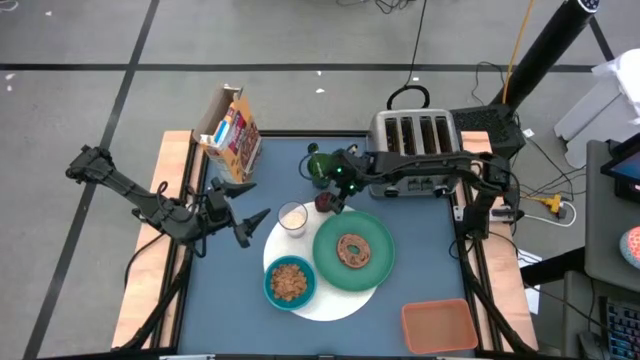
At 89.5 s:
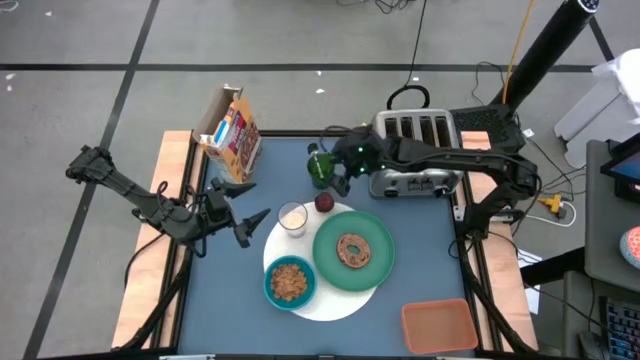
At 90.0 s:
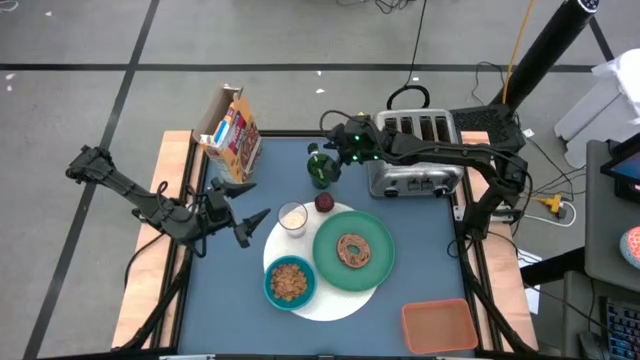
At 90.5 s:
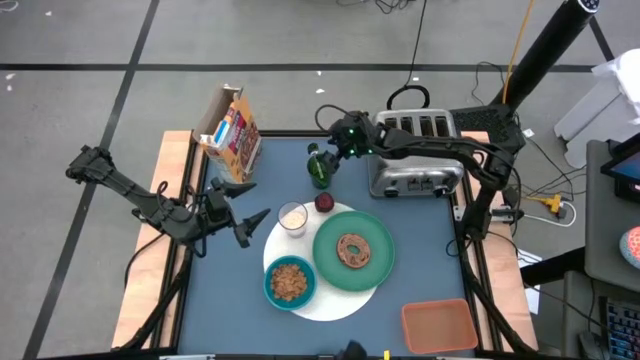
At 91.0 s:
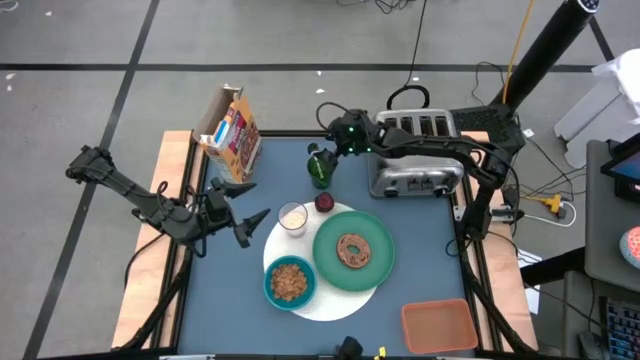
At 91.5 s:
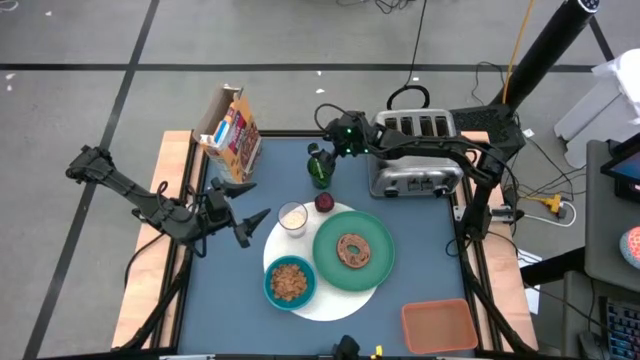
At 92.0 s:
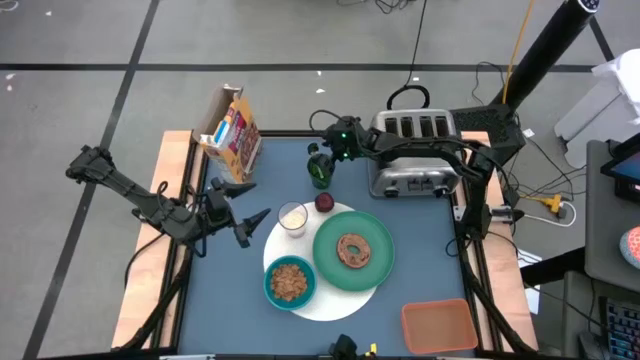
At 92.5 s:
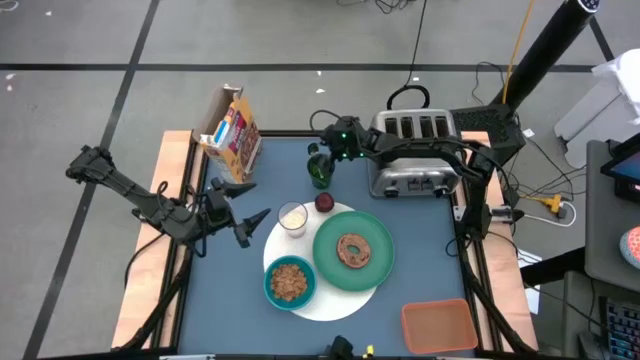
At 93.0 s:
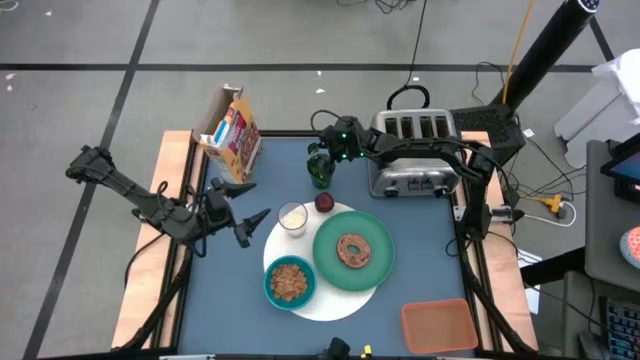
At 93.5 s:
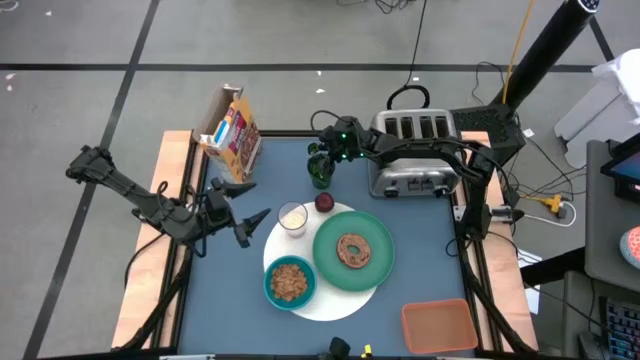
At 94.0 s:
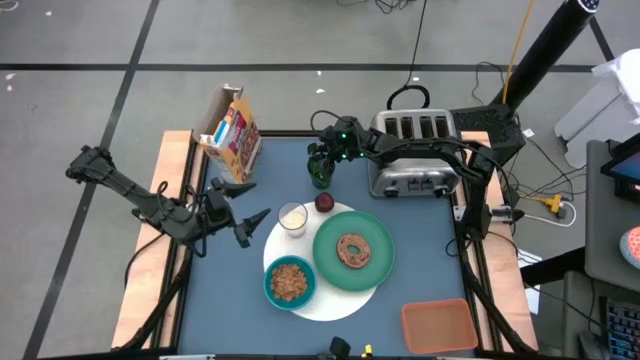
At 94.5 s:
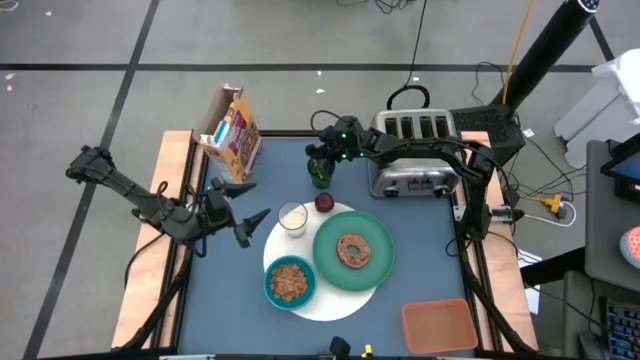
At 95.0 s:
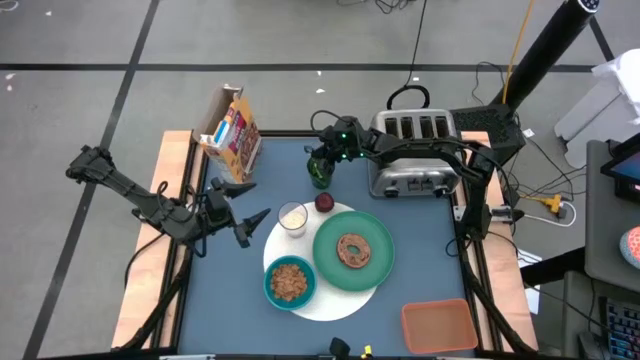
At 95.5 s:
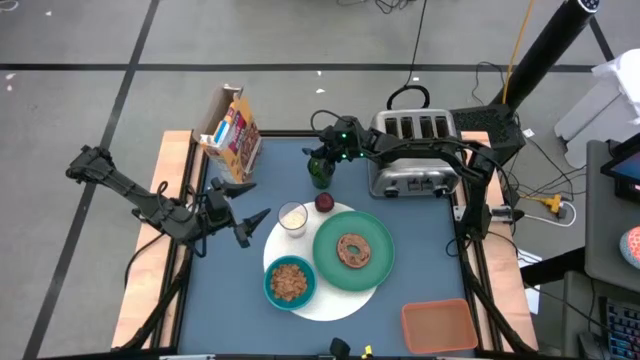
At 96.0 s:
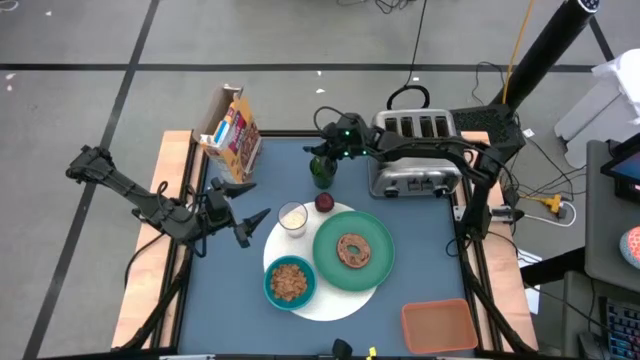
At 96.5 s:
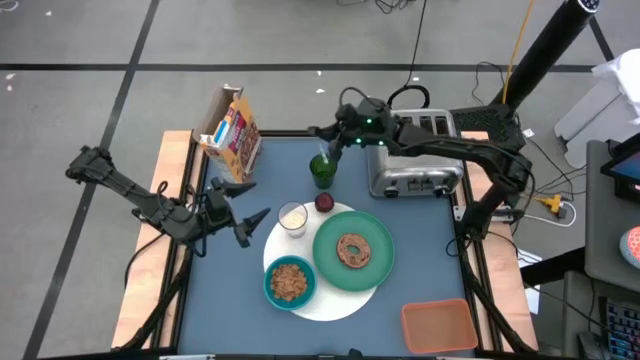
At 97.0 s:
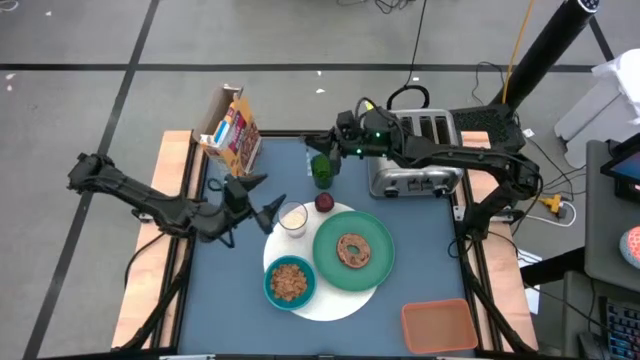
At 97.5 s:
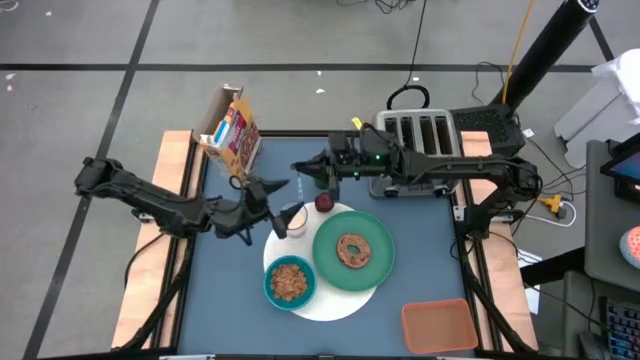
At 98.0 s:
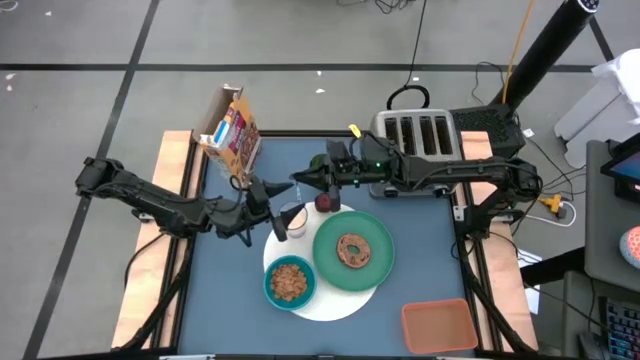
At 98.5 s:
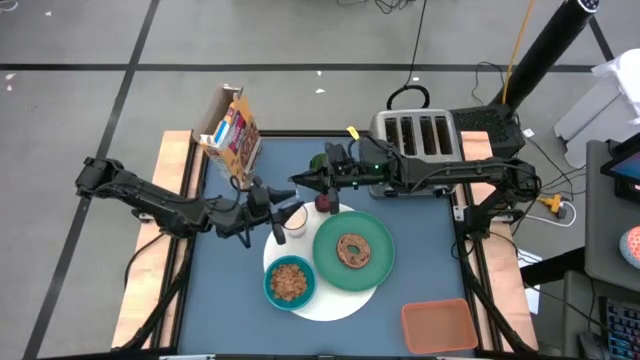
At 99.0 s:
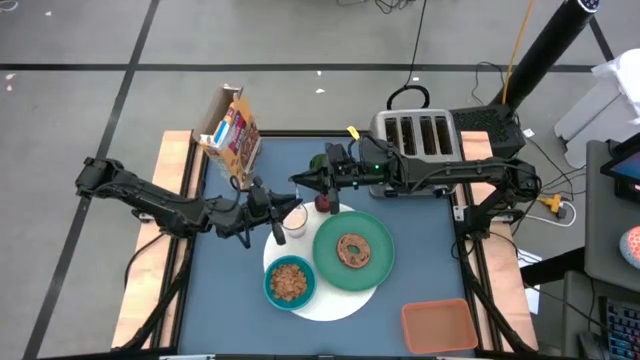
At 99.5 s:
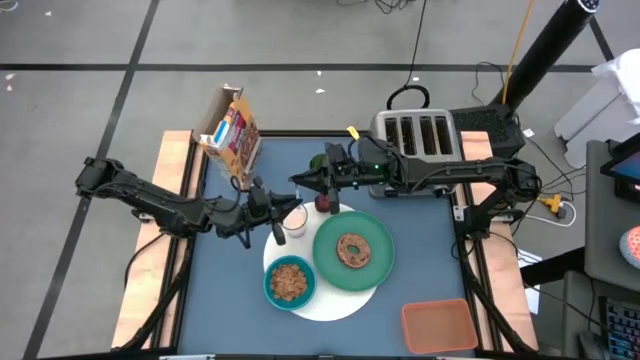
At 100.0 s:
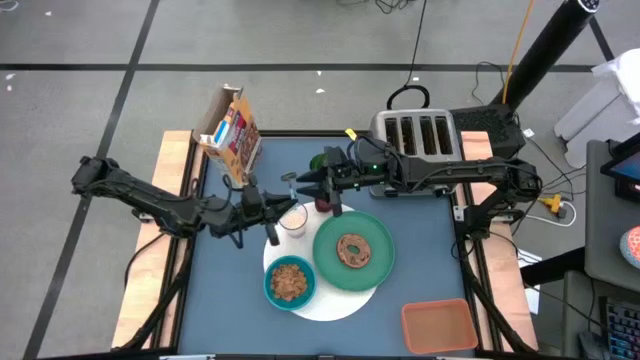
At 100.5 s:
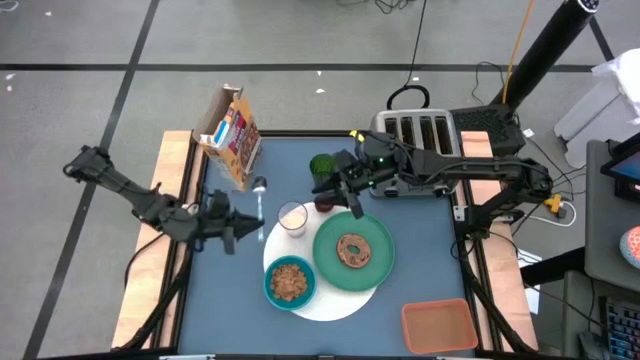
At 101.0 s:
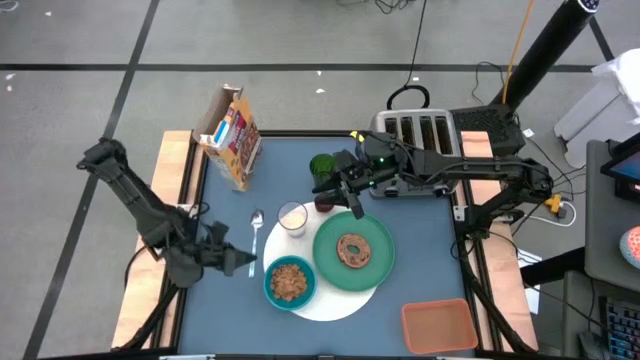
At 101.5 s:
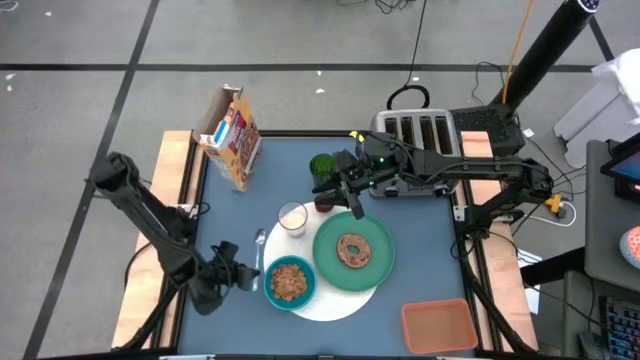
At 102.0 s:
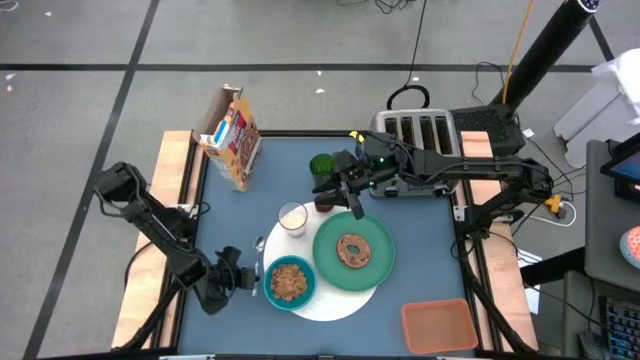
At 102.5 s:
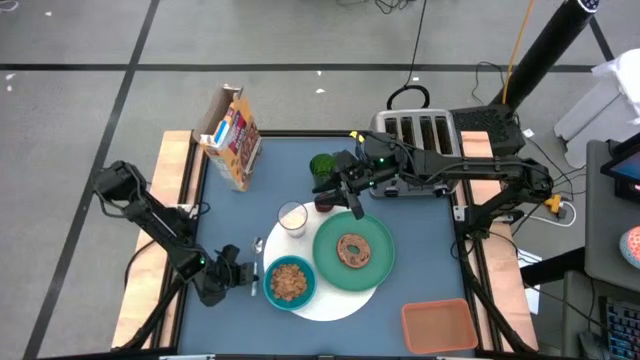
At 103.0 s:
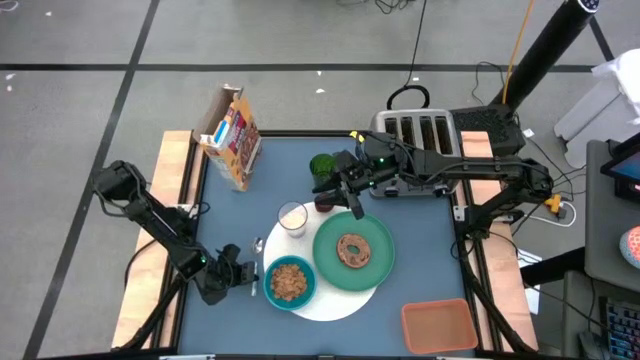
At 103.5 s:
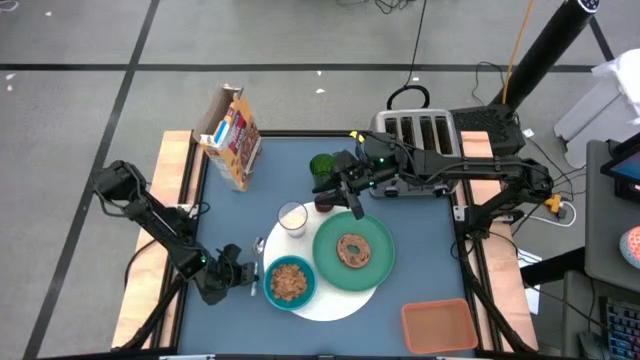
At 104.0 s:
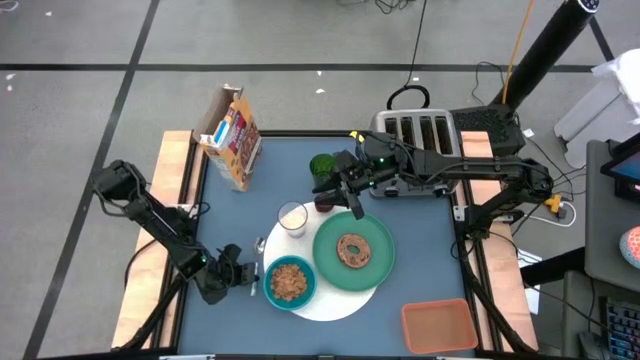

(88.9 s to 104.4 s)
Task: Arrange a breakfast setting
Put the white green spoon to the left of the white tablemat

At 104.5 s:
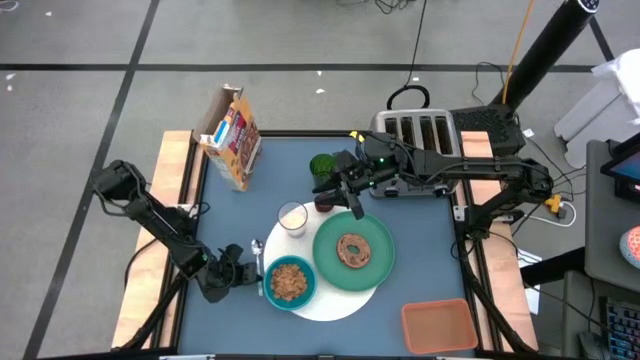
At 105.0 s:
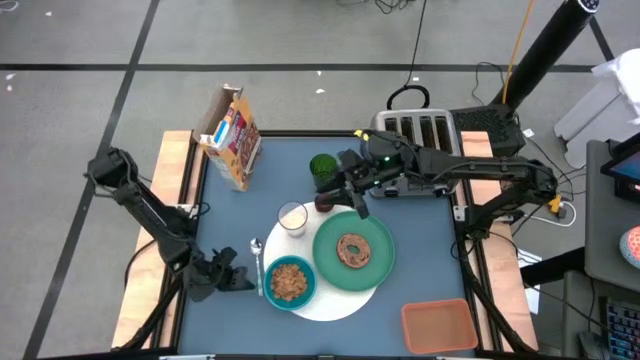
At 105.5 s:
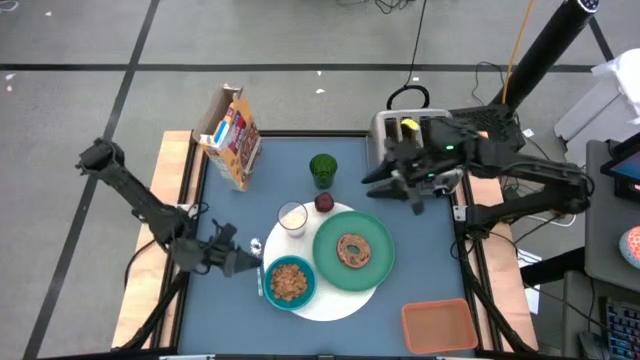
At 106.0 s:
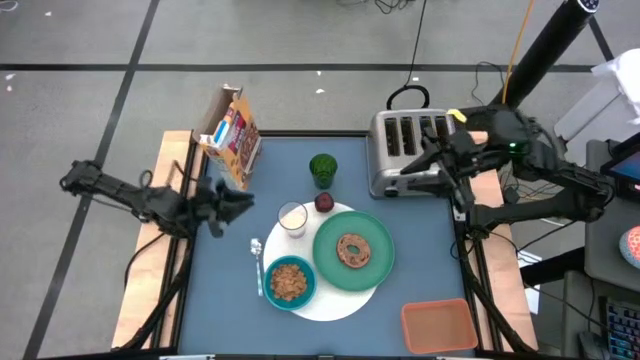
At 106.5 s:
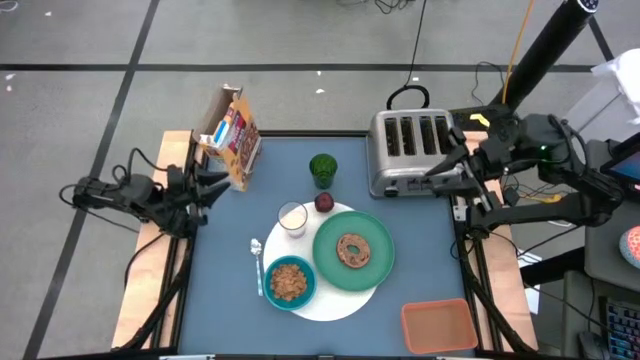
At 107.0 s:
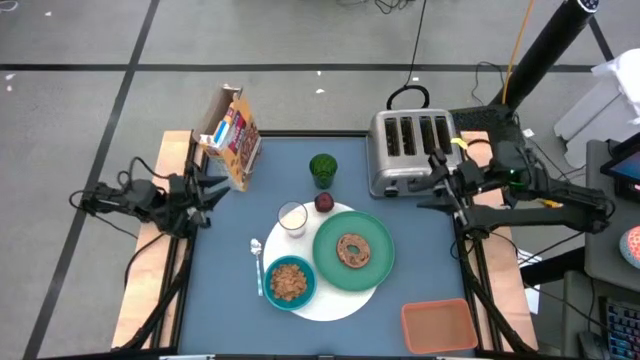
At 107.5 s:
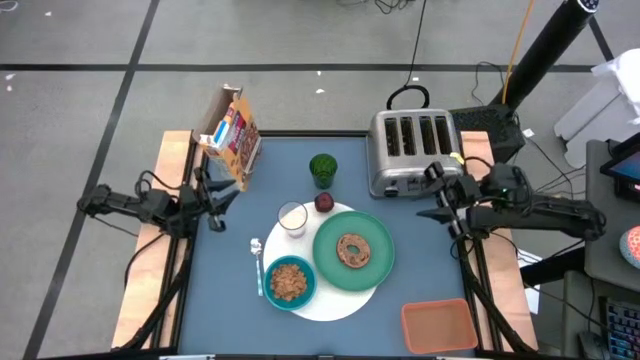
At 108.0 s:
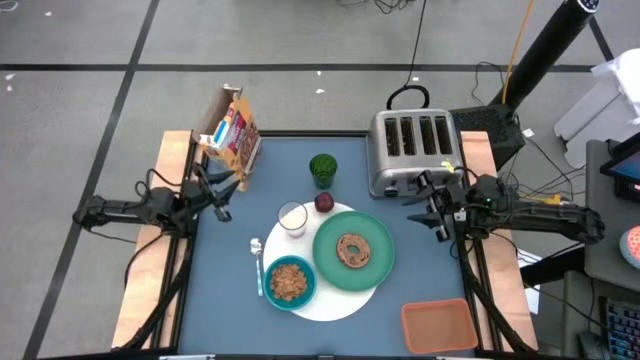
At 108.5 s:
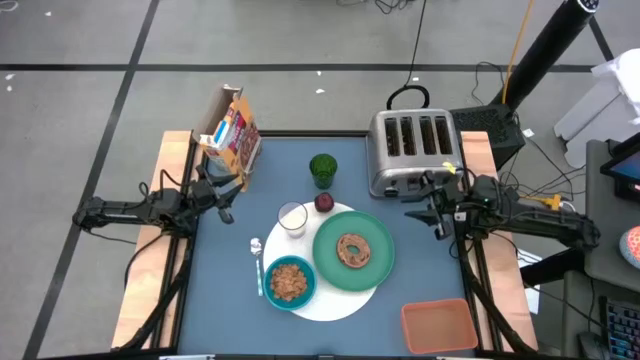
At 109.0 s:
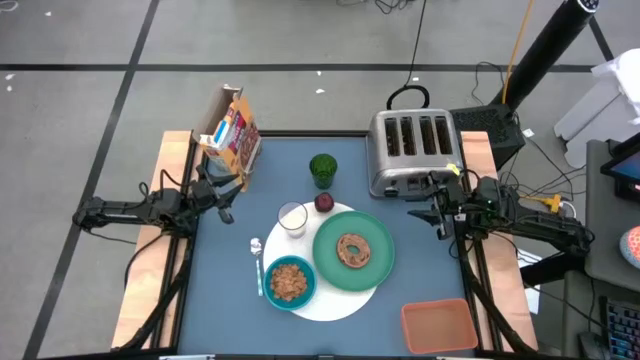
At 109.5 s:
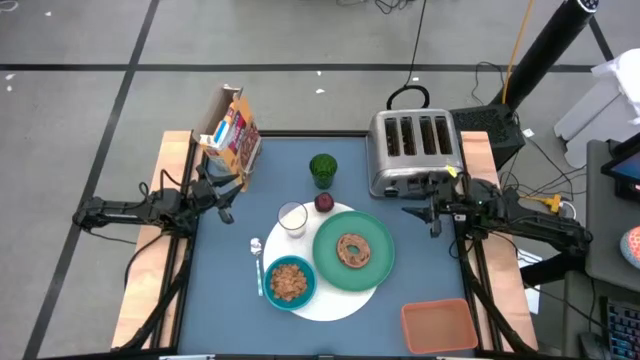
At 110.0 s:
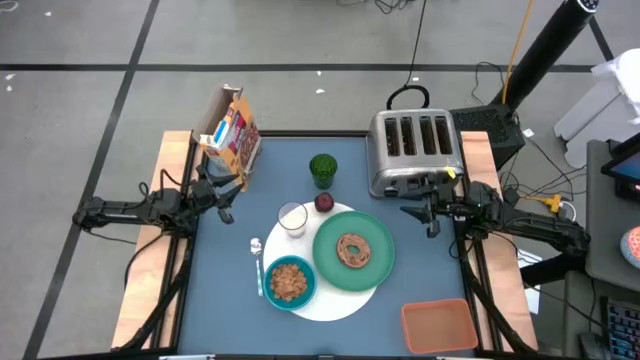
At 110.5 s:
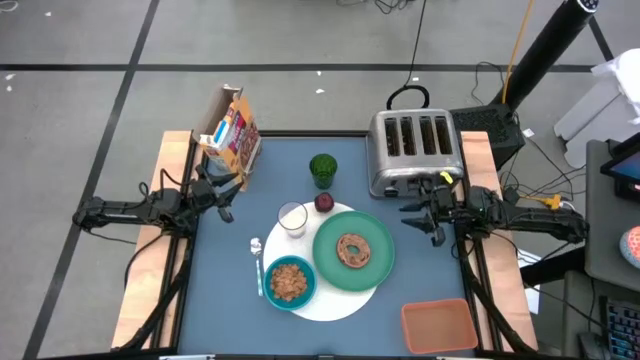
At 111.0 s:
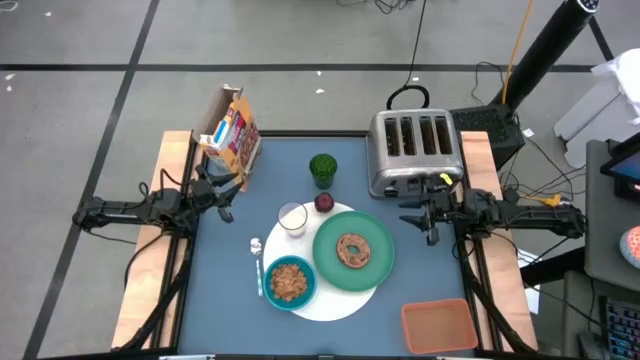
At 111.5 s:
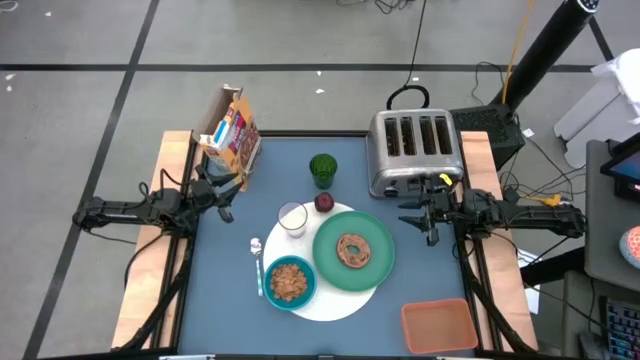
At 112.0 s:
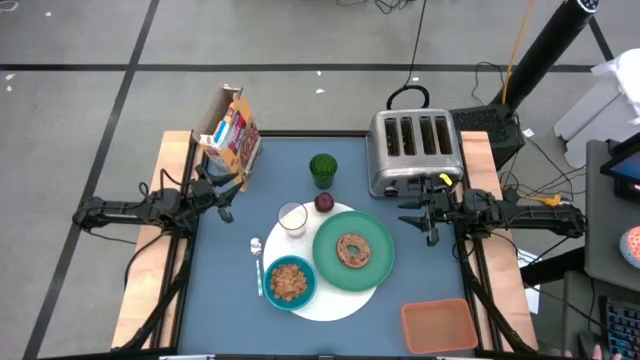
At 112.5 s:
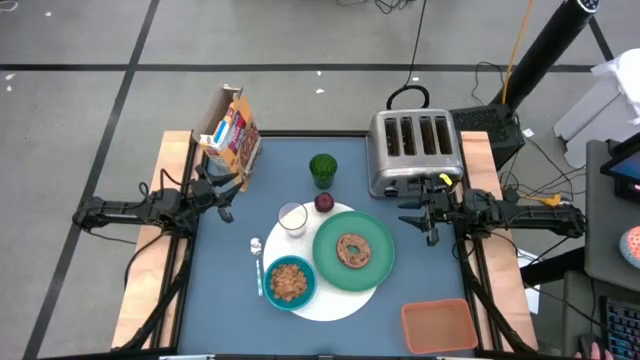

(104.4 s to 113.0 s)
Return to Home Position
